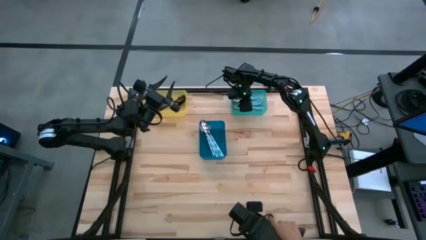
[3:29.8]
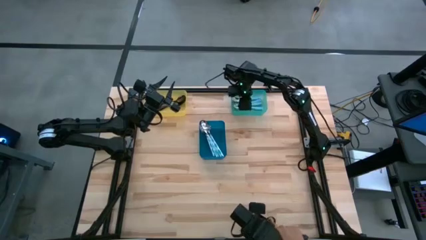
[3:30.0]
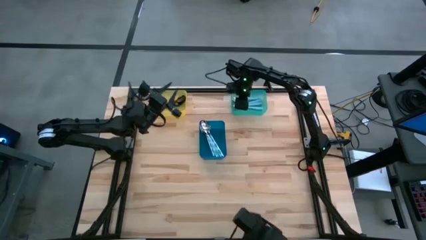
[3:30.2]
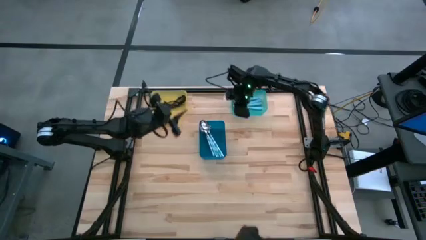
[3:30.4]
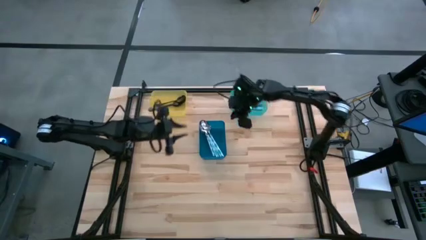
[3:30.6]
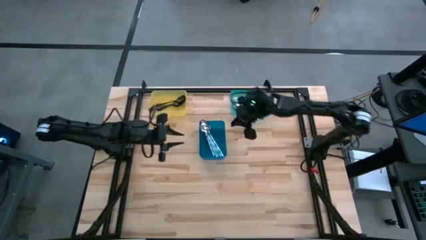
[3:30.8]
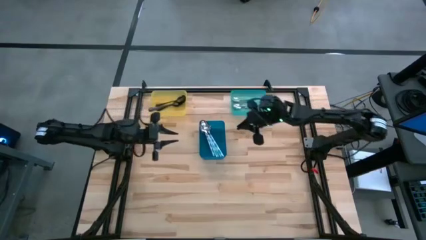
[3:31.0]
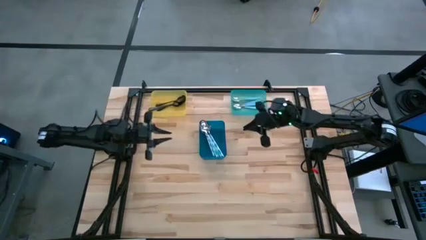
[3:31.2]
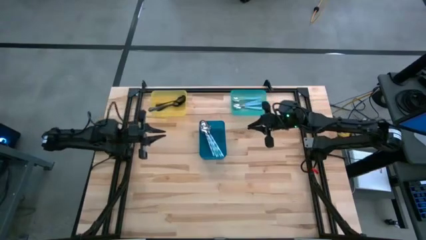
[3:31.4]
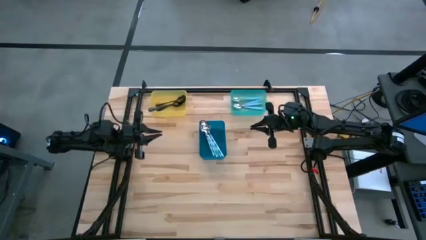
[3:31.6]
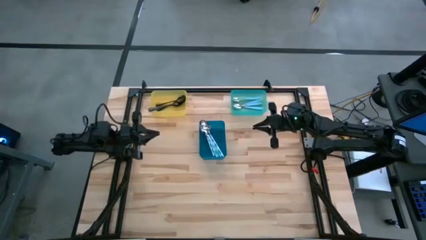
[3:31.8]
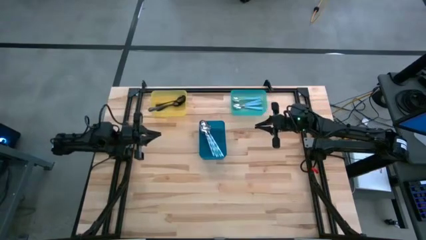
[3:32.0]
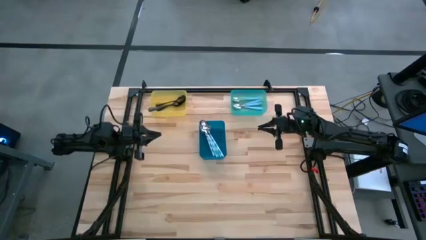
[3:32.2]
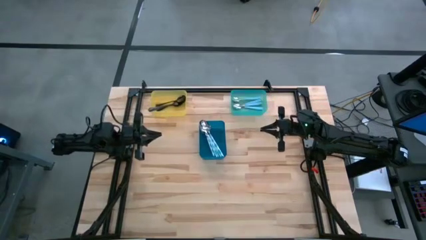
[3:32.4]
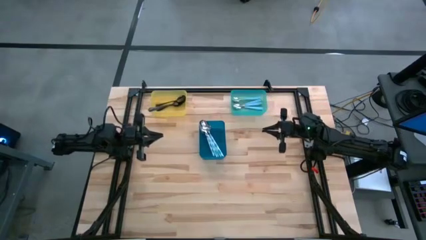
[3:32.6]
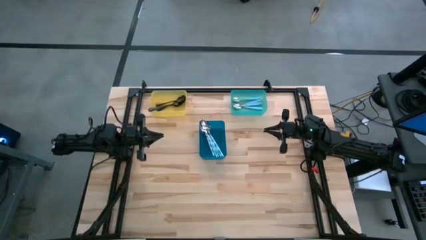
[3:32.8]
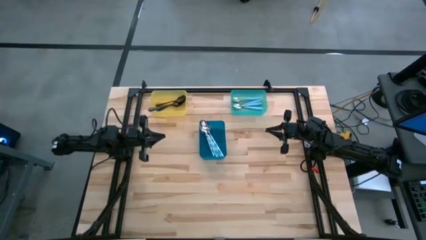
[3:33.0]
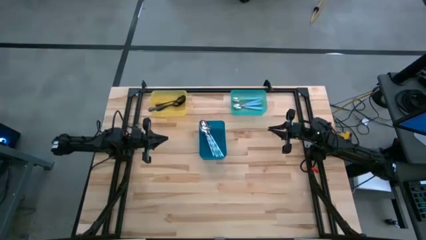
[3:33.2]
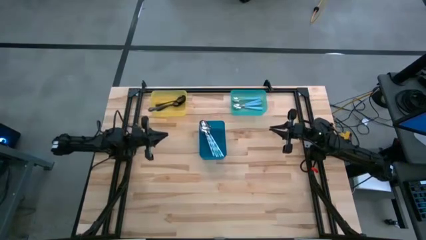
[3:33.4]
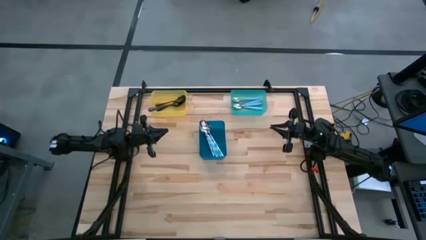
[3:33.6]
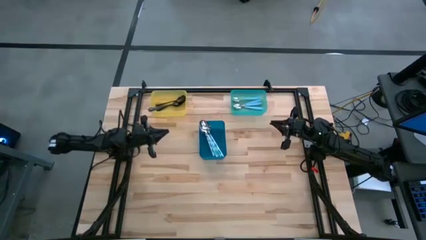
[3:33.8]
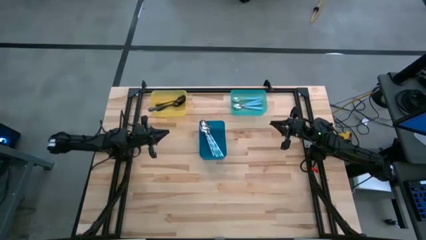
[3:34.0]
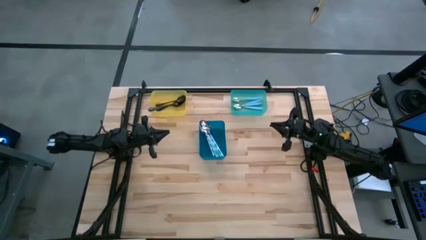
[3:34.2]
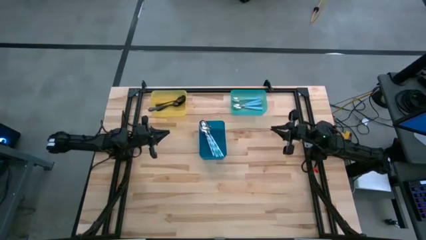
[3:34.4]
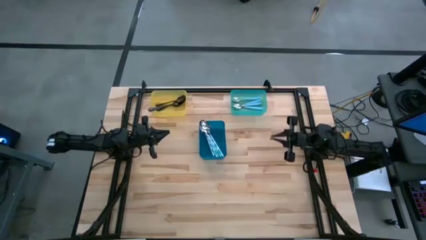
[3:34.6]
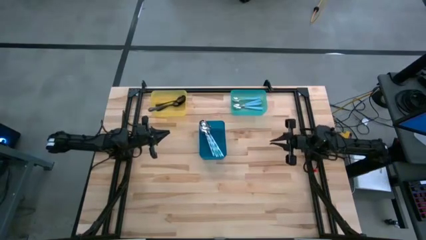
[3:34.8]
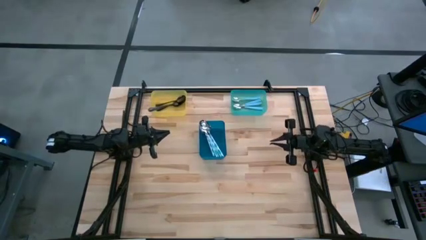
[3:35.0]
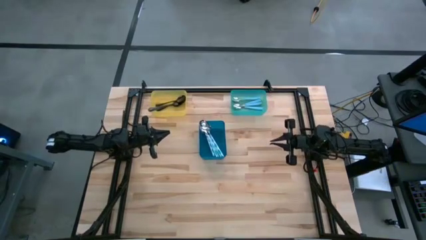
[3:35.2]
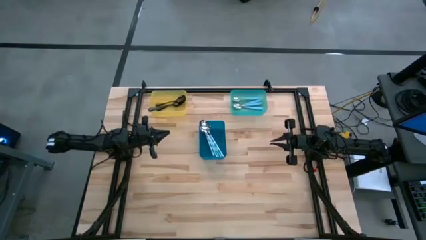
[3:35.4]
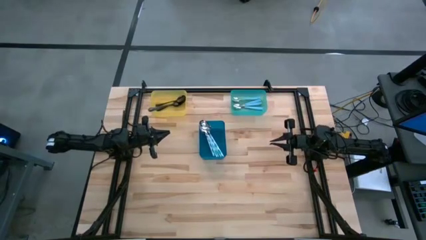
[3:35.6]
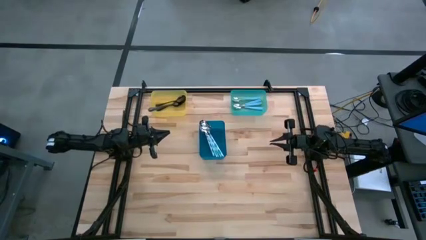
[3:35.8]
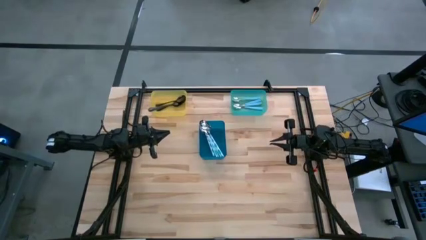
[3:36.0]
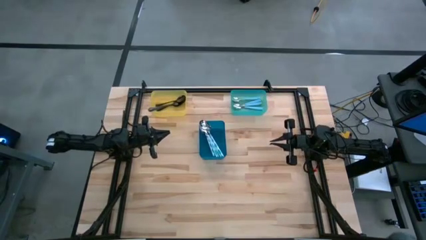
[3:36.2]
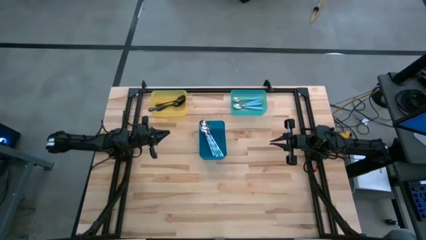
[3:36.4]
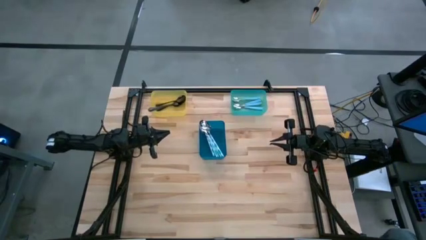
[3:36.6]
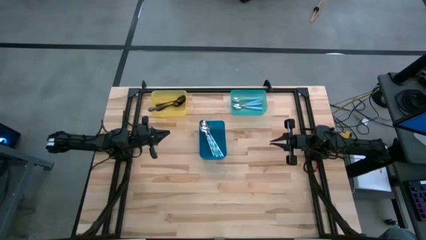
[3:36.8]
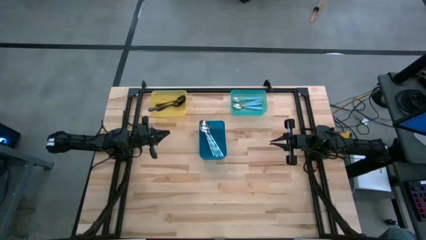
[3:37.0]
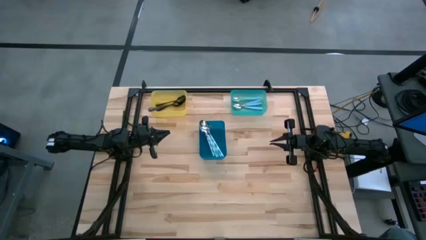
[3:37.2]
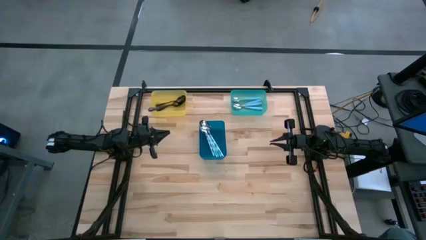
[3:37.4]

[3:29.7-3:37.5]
Task: Sort silverware by color (type)
Return to Home Position

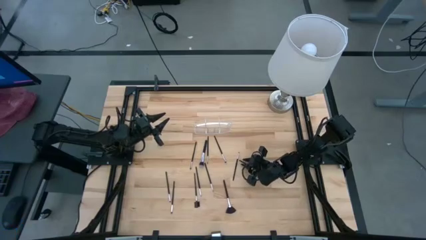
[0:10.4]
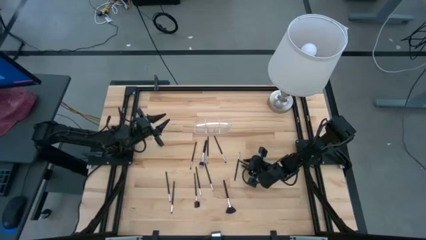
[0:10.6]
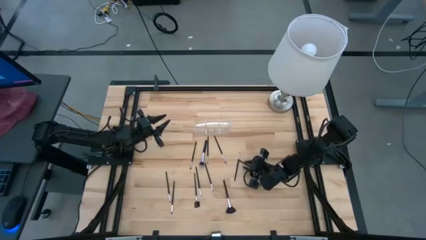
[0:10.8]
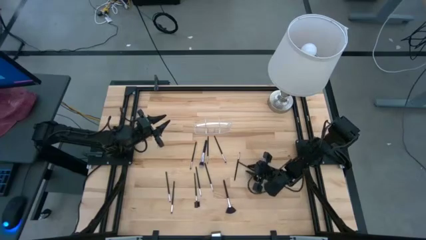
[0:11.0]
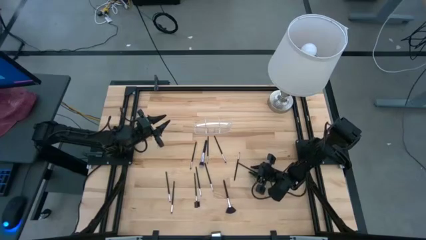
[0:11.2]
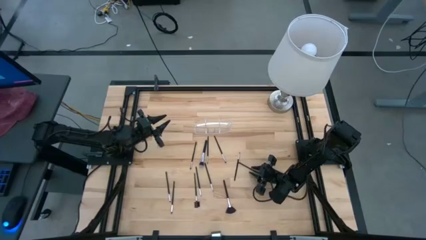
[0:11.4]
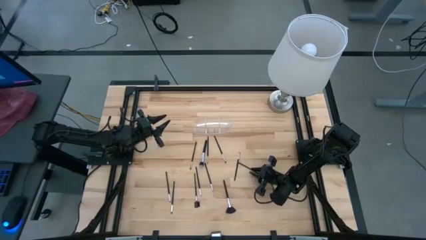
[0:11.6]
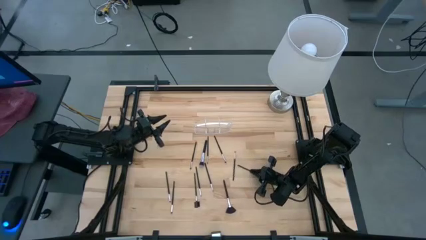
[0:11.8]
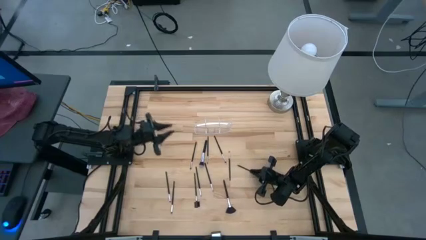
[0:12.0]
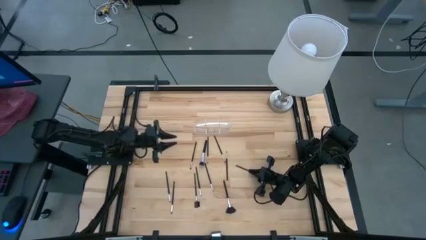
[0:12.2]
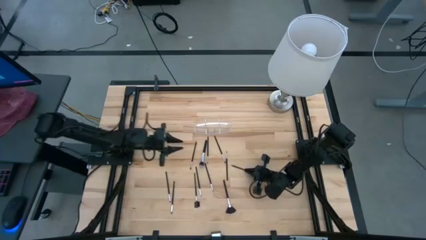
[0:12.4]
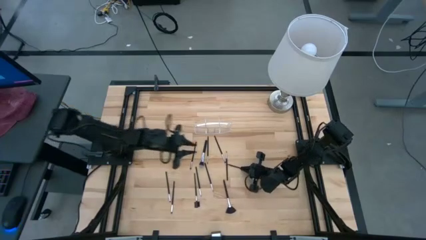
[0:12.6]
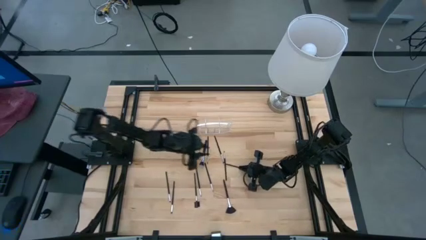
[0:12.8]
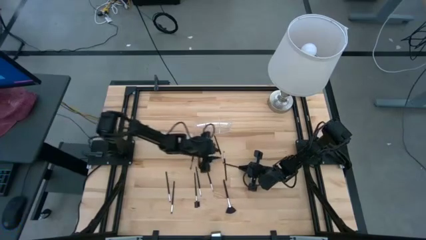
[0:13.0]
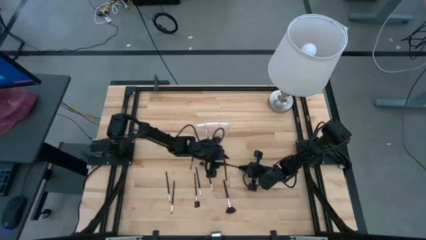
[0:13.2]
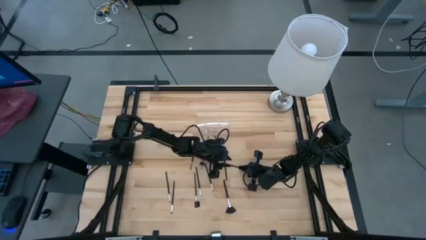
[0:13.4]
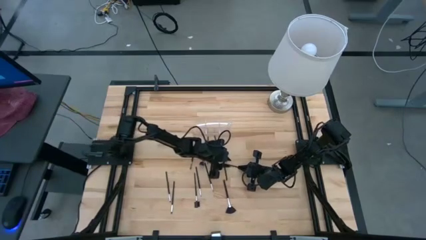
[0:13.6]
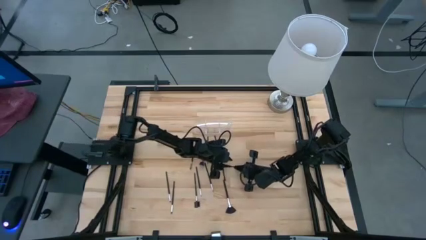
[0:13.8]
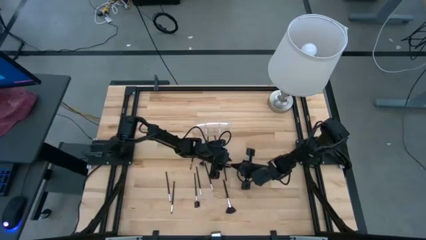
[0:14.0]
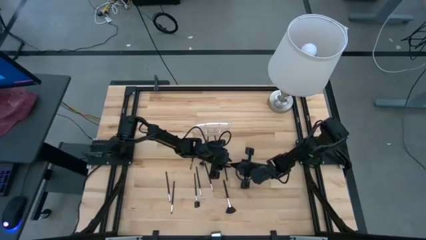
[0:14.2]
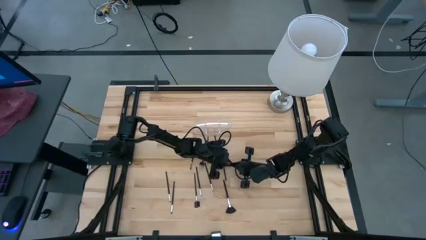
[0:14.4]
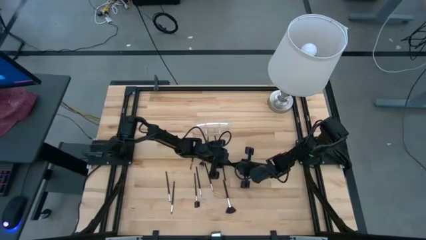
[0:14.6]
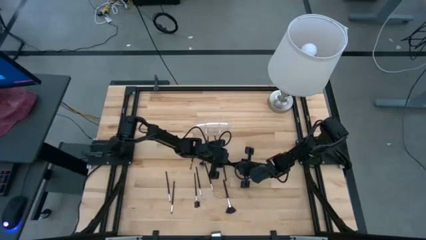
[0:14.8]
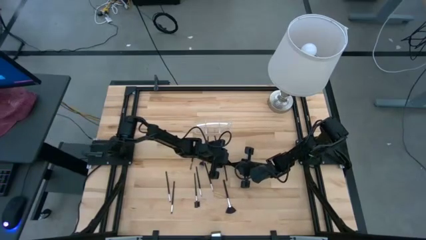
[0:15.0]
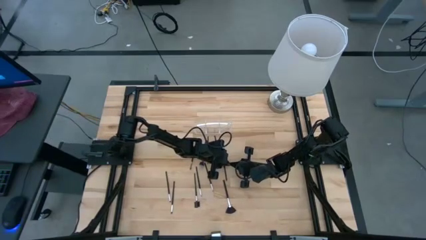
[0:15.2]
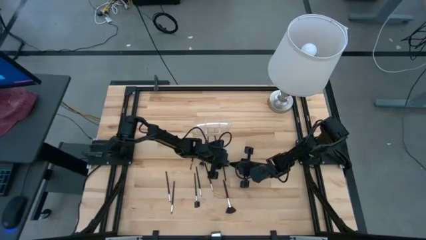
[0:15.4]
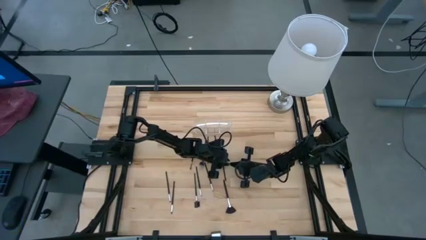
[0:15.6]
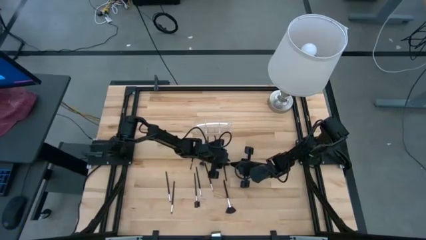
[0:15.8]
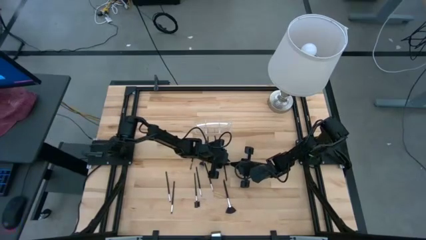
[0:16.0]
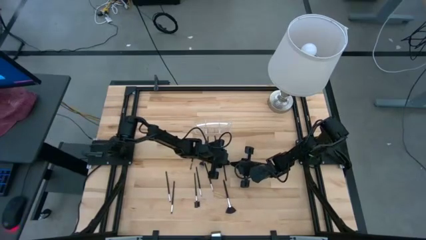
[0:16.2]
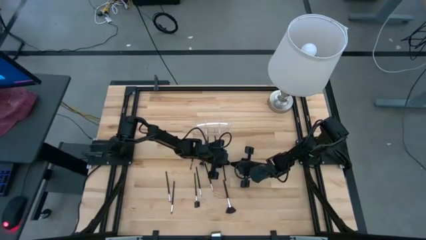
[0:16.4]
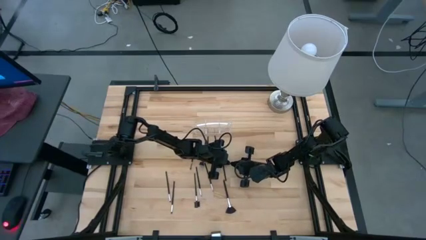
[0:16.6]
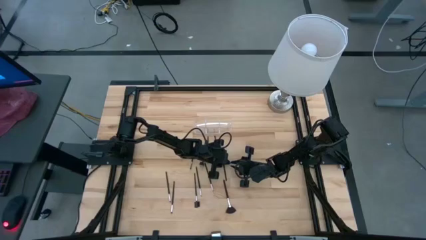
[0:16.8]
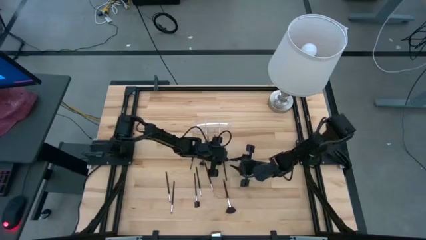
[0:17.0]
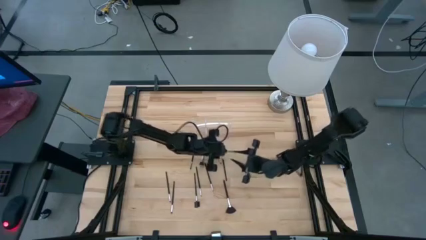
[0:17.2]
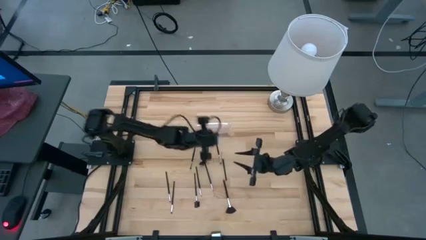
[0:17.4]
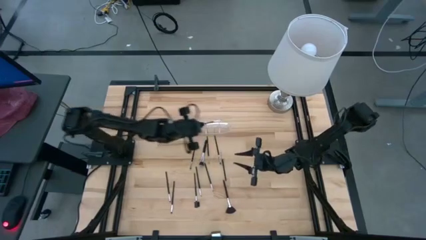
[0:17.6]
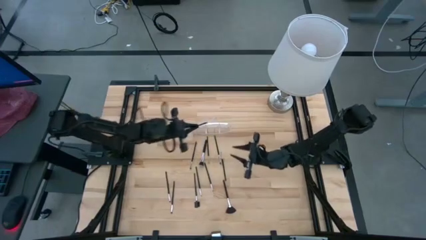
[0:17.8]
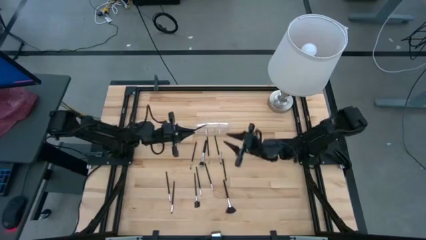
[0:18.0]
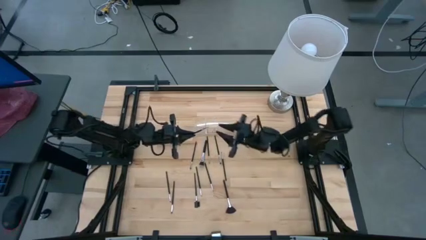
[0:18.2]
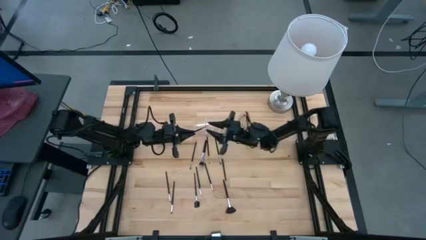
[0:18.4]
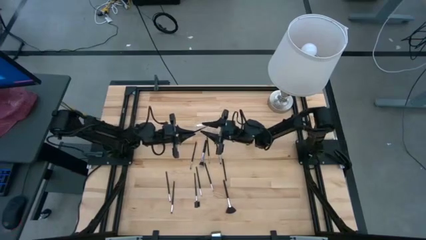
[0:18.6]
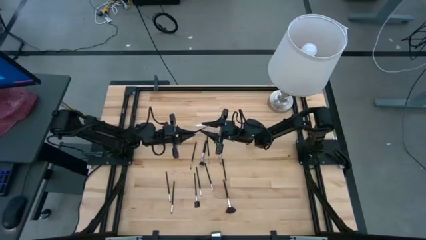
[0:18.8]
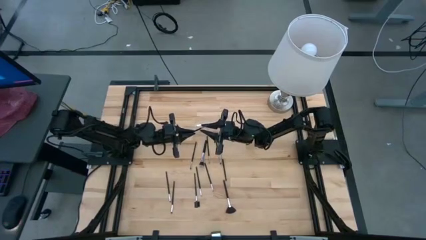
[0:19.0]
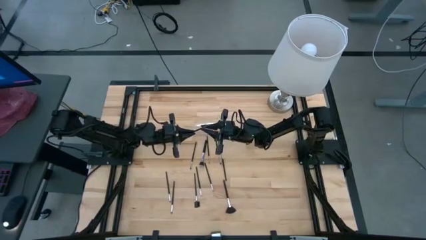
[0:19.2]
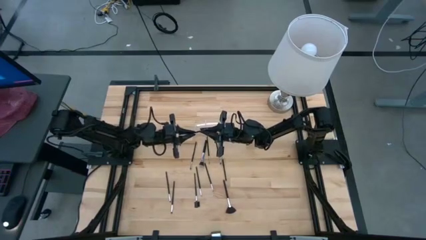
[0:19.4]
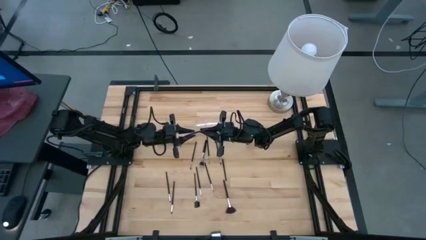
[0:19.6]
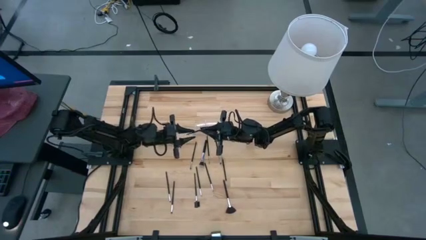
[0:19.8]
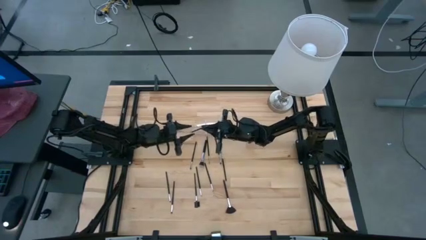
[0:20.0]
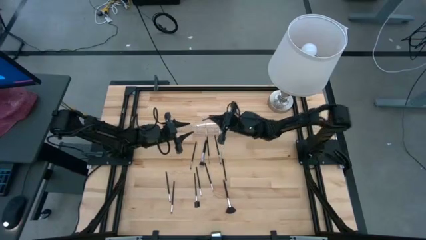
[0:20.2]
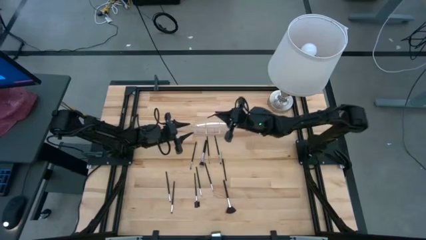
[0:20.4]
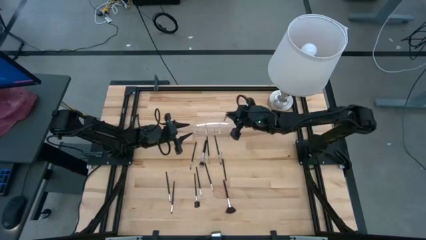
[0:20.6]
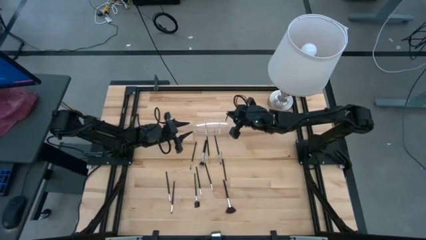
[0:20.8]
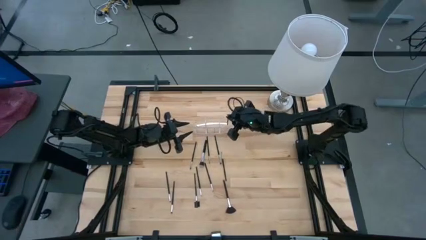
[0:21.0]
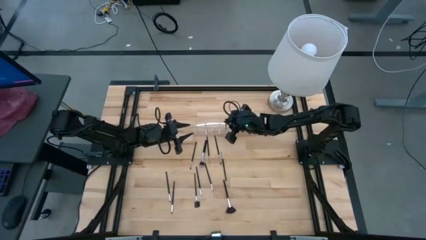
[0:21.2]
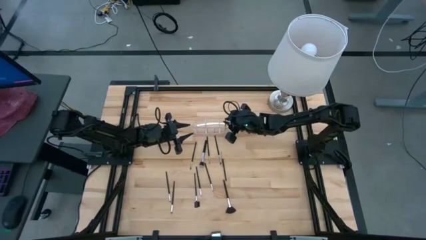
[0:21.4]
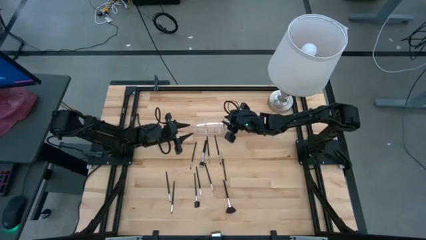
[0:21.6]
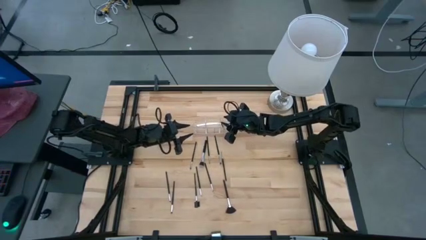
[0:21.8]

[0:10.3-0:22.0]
Task: Put items in baskets/containers
Put the black eyeshadow brush into the transparent organizer
